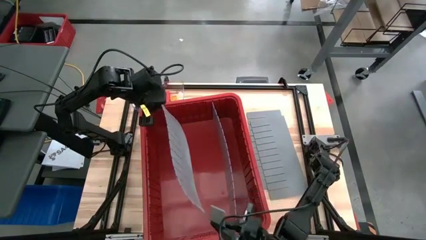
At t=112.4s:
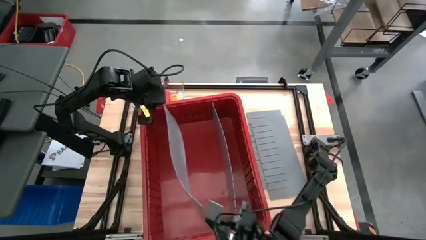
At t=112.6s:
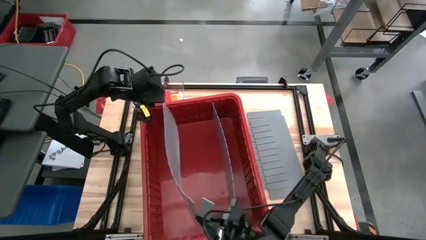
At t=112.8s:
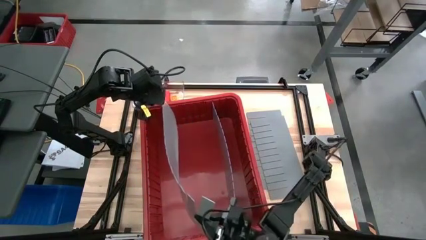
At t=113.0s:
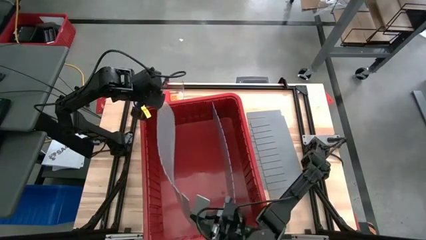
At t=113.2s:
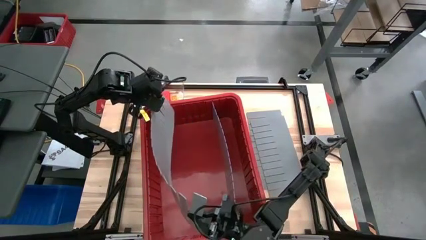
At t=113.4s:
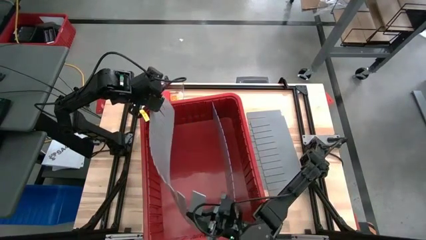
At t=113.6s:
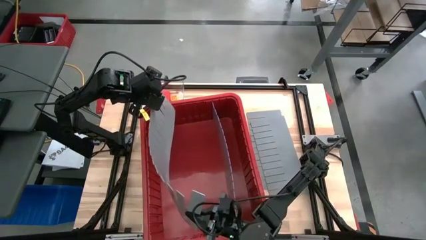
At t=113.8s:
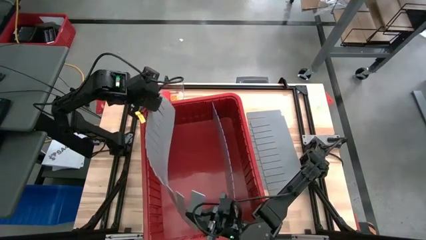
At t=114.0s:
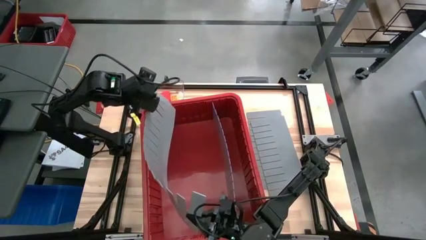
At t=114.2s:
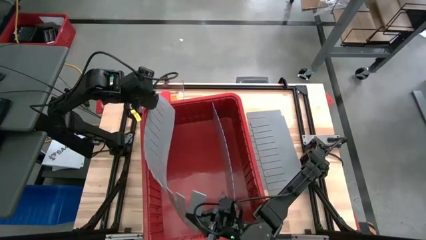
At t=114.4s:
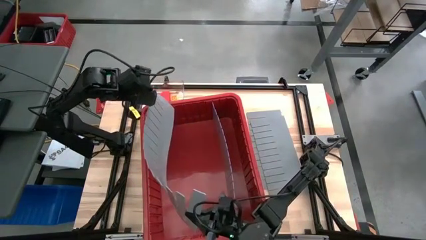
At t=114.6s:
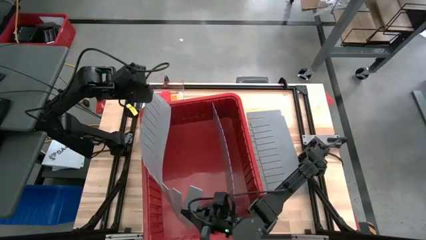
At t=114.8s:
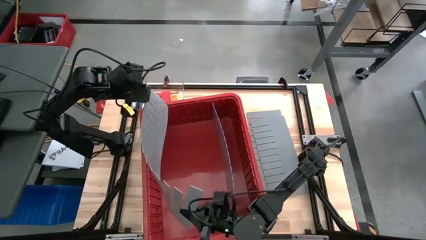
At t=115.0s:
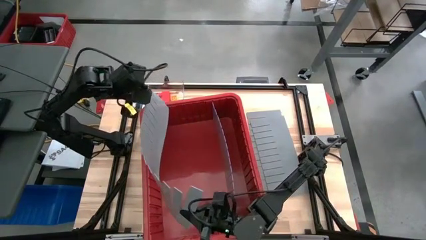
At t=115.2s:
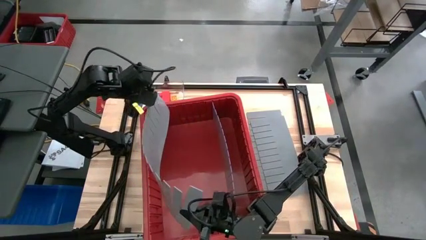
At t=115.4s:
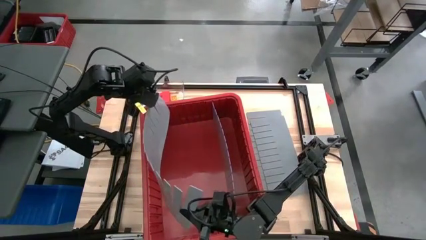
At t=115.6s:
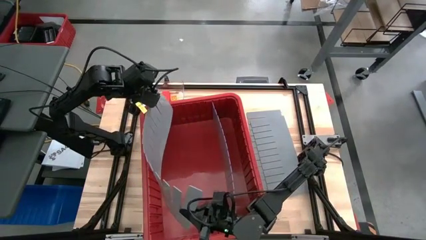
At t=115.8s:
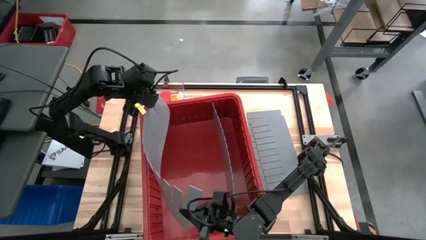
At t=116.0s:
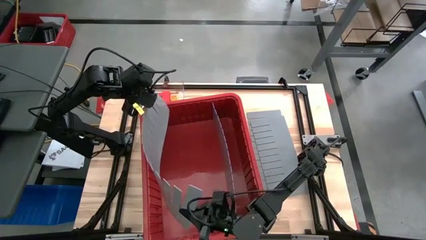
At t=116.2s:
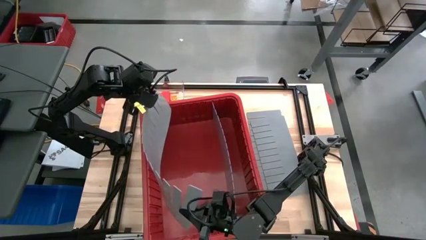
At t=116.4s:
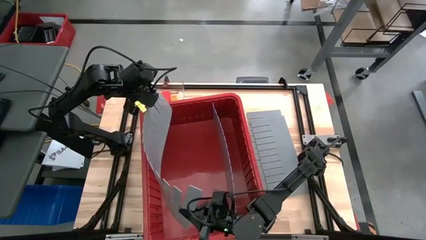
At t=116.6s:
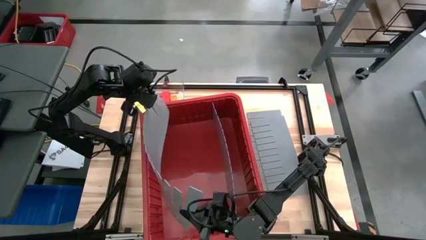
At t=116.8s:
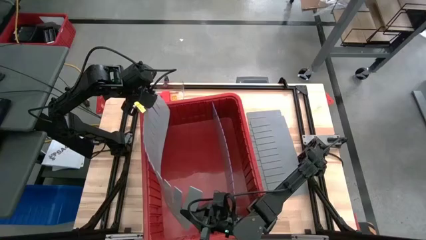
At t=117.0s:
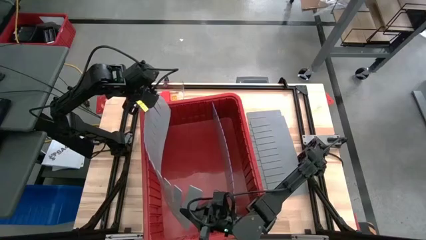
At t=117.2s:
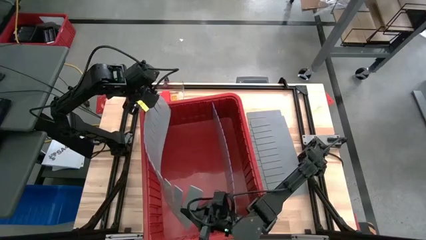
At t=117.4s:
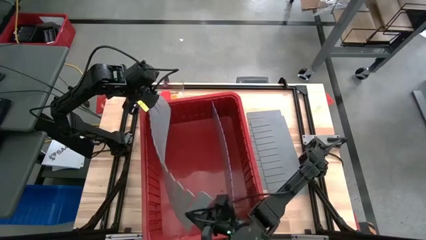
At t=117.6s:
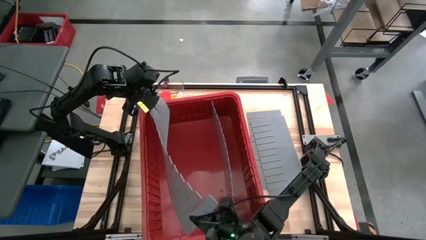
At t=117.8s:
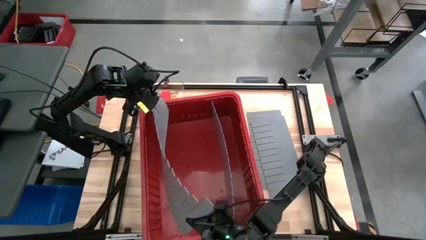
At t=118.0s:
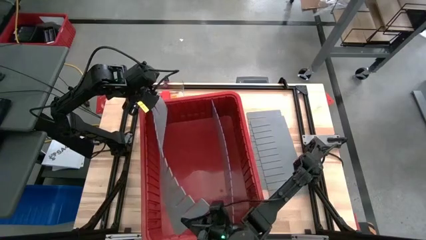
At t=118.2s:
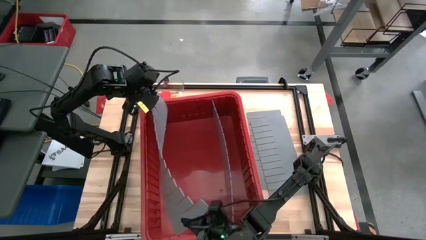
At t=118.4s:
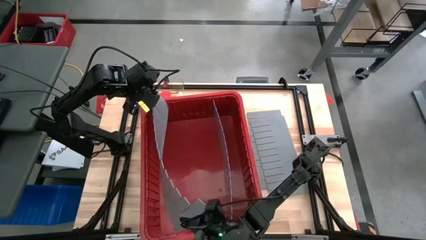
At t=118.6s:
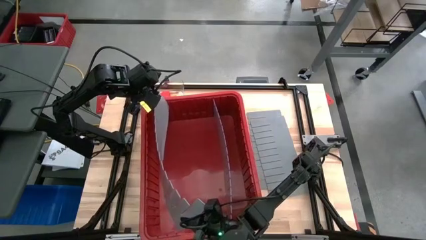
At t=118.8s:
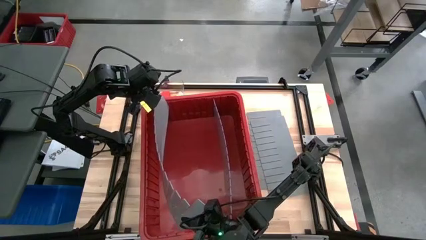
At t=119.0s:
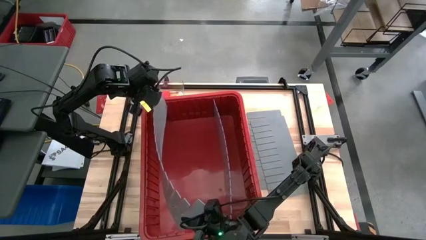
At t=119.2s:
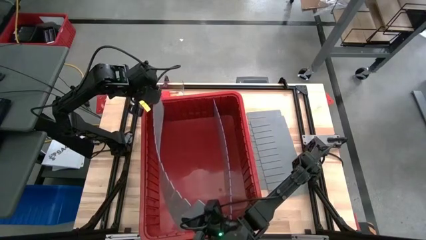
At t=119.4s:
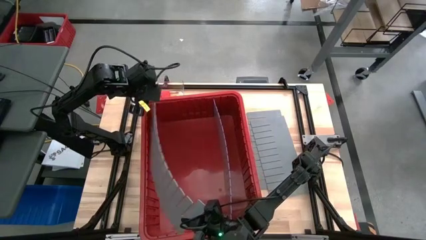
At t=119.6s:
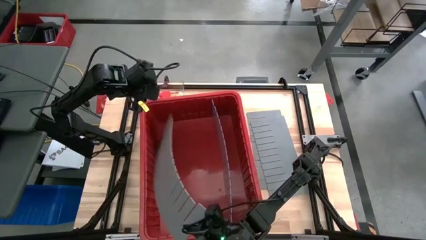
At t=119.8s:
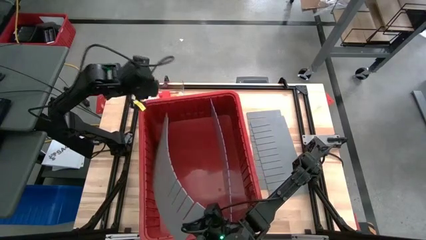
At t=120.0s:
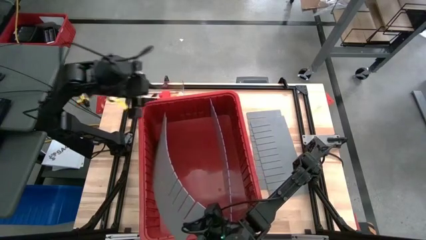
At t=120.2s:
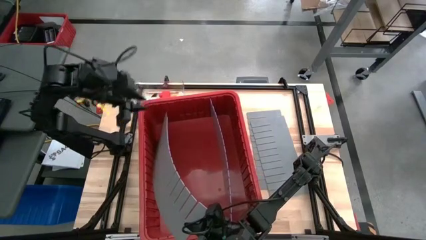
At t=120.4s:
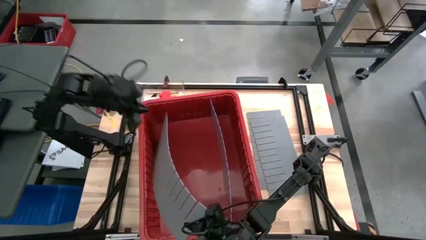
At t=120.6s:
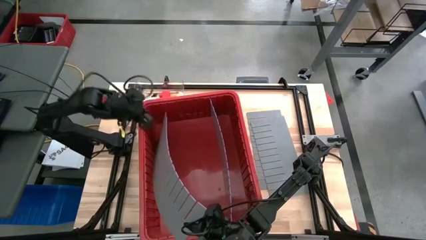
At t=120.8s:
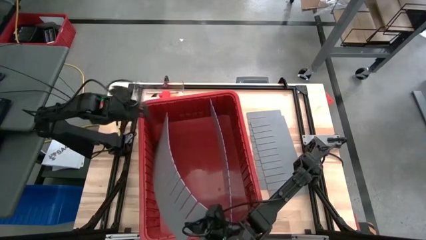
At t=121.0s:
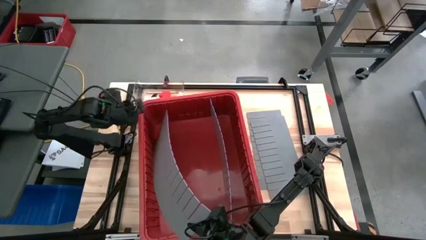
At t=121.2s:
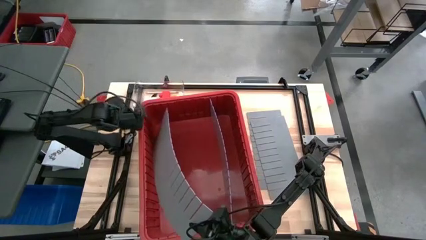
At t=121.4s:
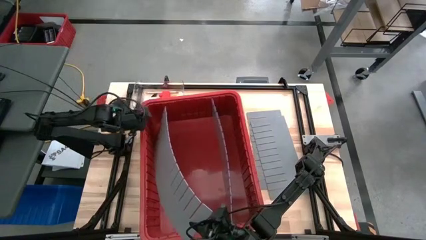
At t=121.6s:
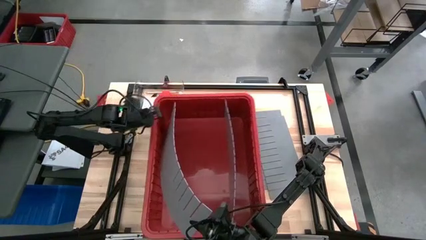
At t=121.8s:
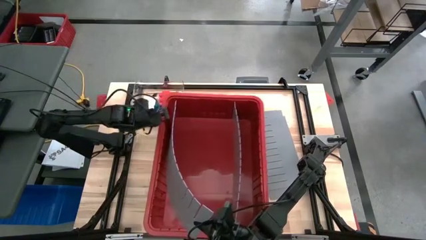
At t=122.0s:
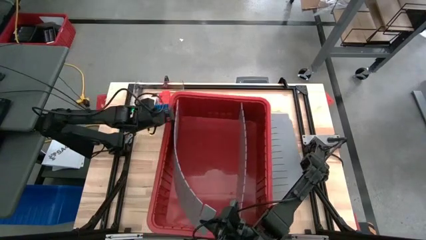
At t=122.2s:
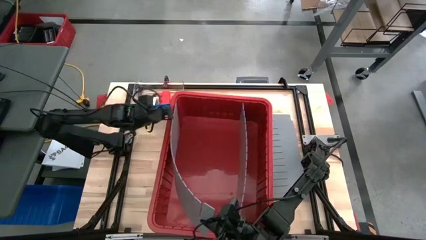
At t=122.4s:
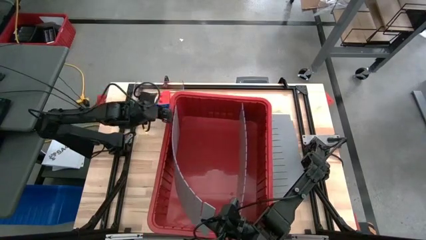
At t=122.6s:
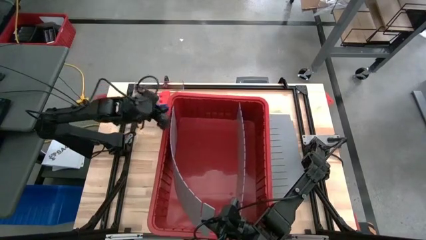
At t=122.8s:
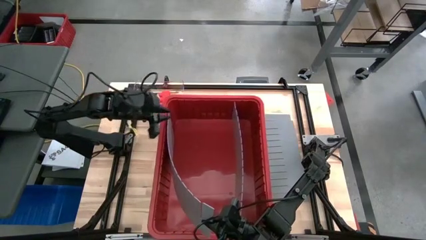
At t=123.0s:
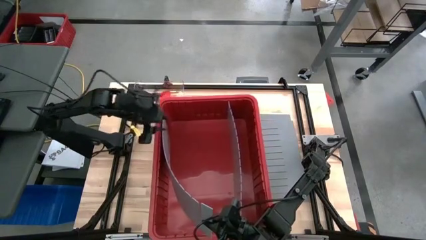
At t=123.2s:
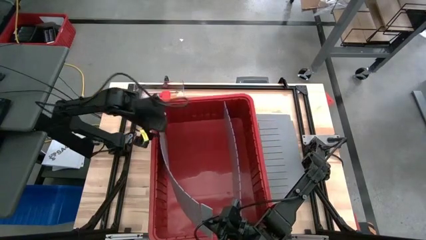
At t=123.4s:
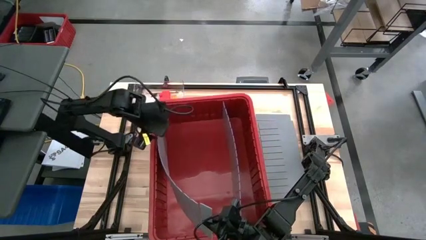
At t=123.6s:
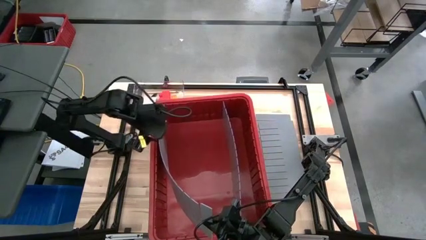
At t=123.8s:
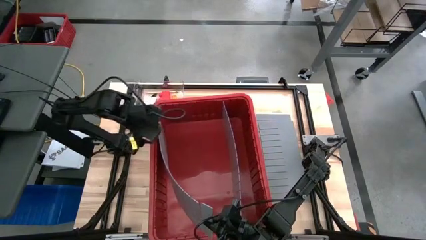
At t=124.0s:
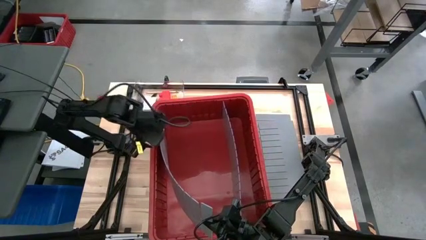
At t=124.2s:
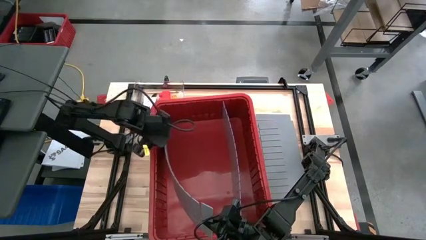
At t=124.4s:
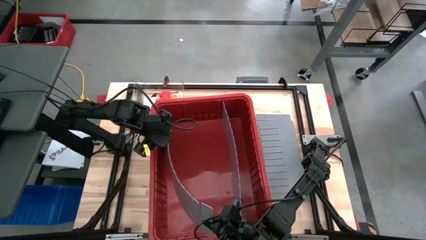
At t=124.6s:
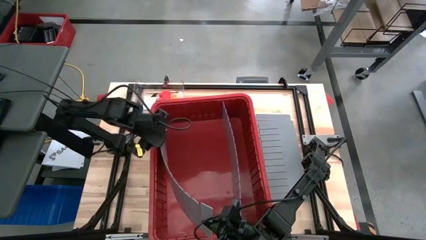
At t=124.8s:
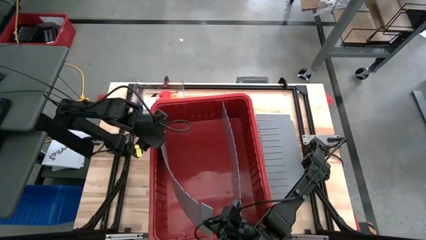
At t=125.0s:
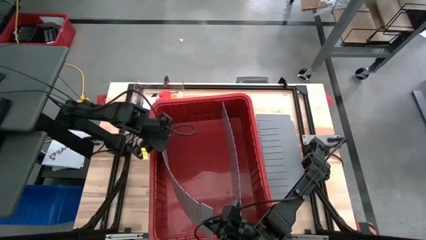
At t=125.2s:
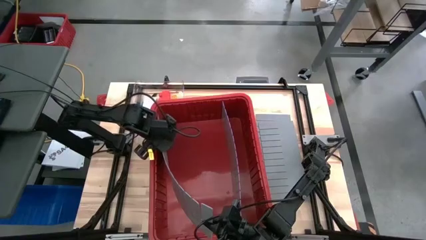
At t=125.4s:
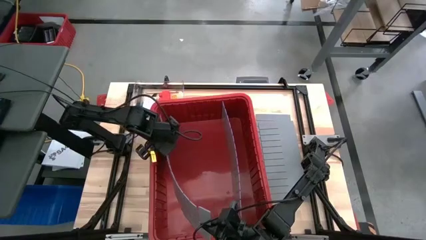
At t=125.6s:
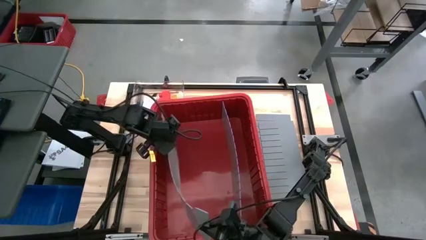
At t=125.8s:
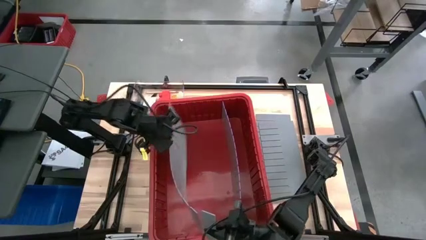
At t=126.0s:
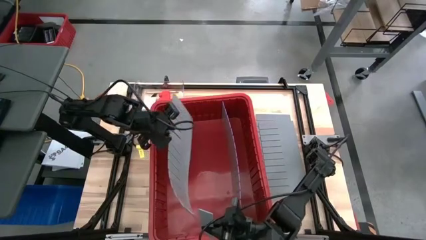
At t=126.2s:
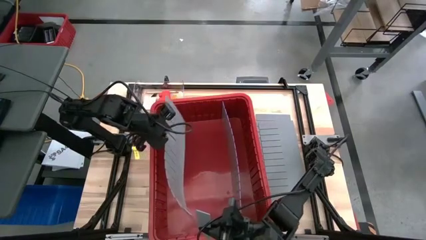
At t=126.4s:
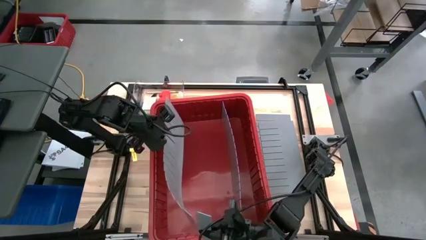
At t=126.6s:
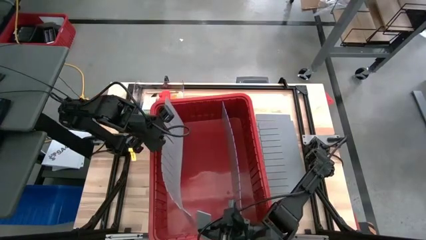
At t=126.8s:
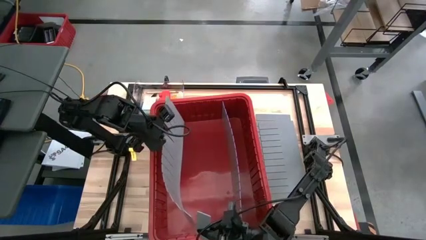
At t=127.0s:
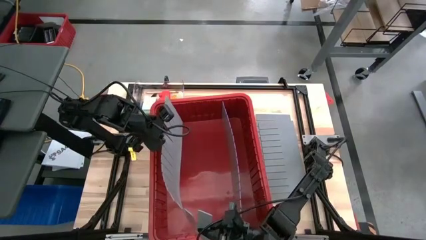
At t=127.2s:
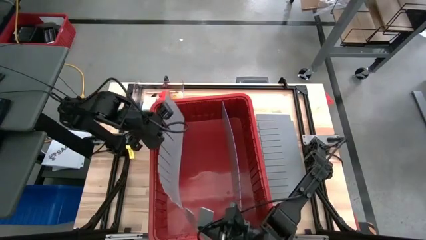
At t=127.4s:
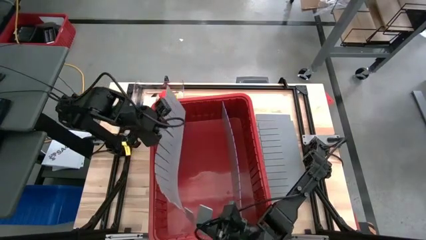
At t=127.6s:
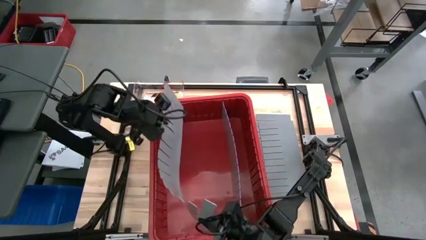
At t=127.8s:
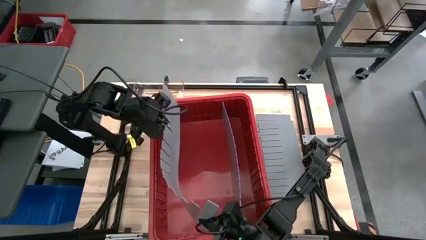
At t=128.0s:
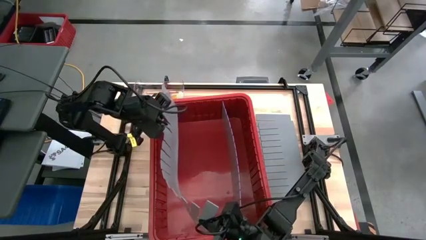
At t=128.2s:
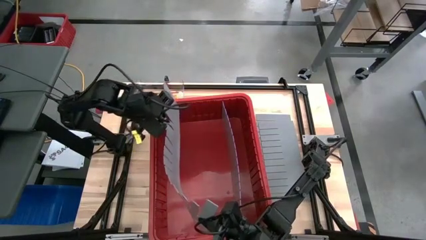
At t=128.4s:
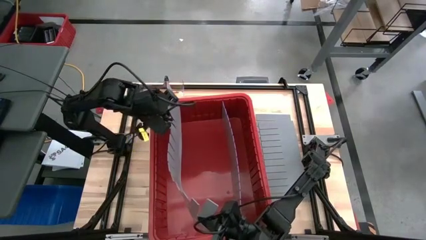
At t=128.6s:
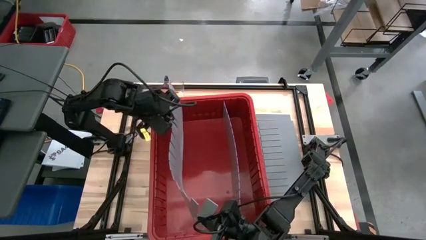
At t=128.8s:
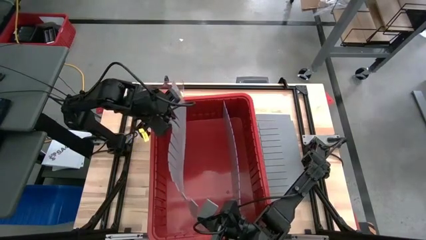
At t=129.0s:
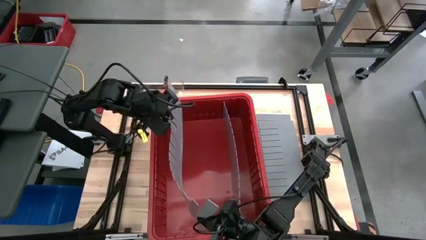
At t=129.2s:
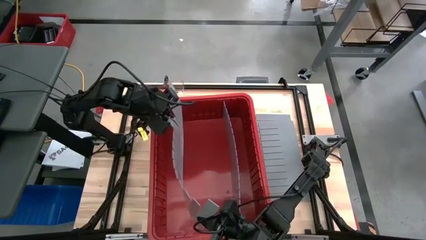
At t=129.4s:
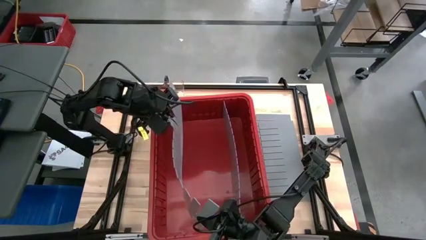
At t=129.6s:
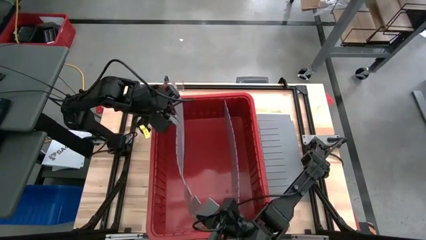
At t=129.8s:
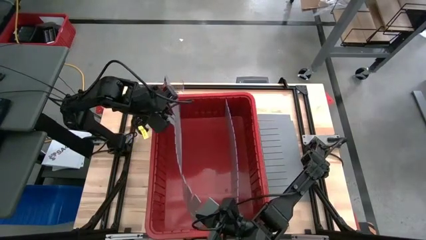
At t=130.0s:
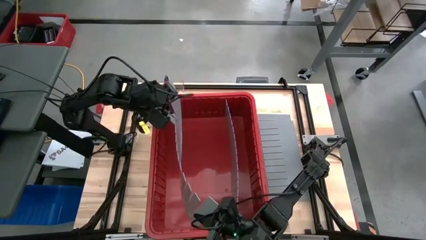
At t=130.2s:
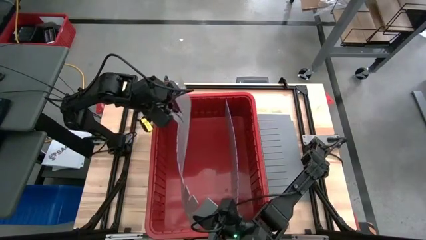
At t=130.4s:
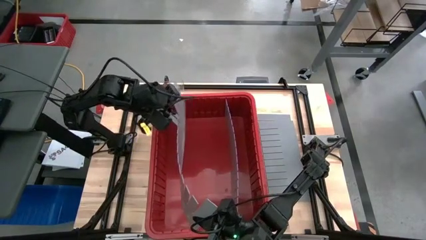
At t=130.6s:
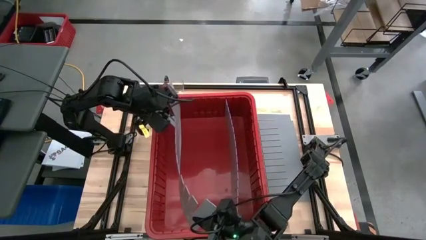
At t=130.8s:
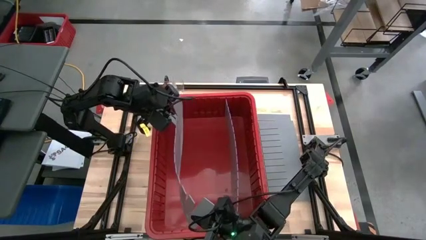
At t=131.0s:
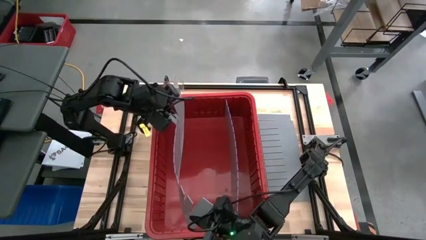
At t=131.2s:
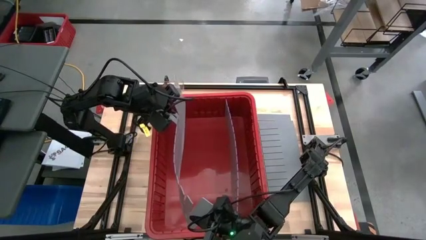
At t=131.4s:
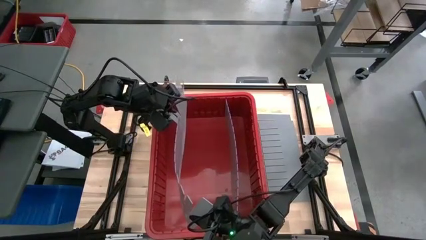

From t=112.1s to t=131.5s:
Task: Sort blocks
Assemble the bin divider into the red bin
